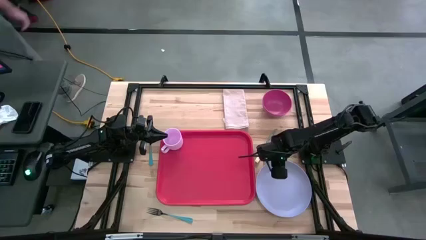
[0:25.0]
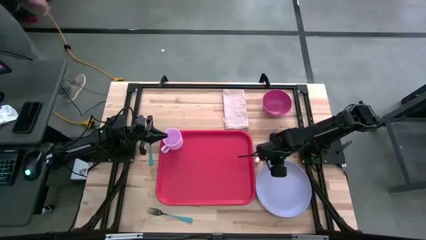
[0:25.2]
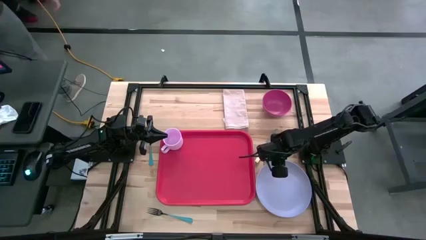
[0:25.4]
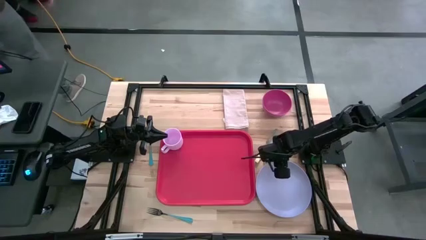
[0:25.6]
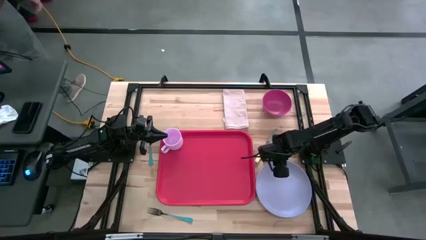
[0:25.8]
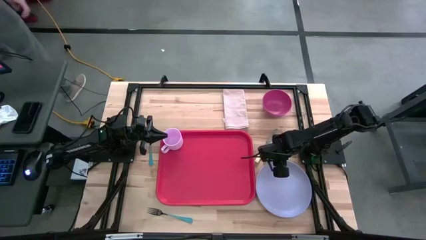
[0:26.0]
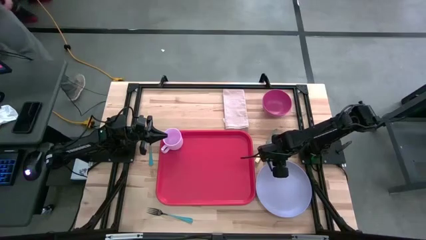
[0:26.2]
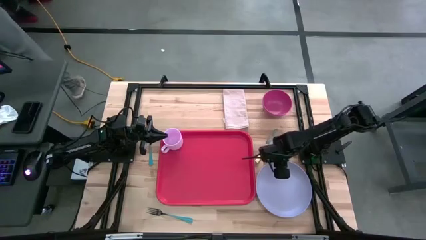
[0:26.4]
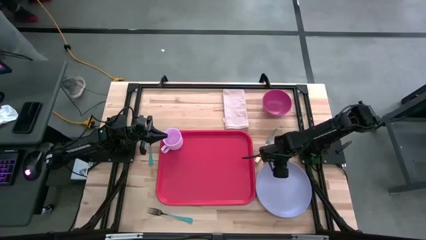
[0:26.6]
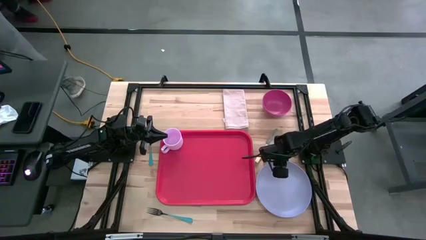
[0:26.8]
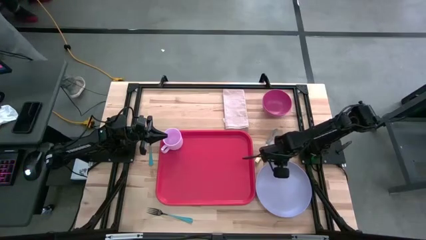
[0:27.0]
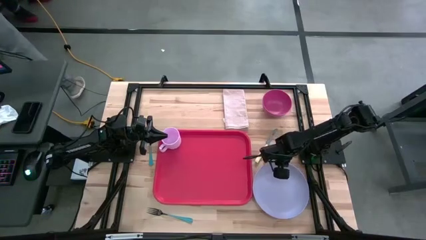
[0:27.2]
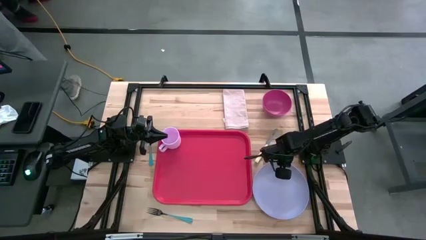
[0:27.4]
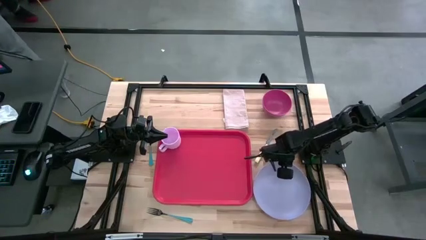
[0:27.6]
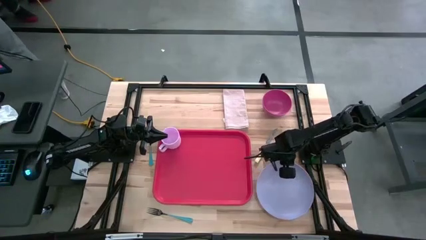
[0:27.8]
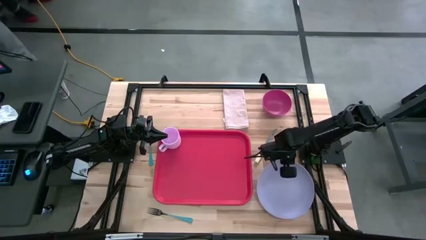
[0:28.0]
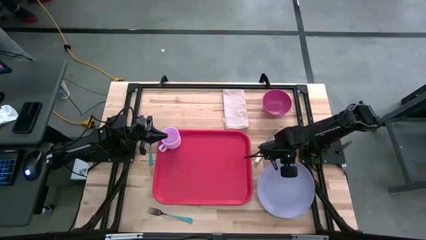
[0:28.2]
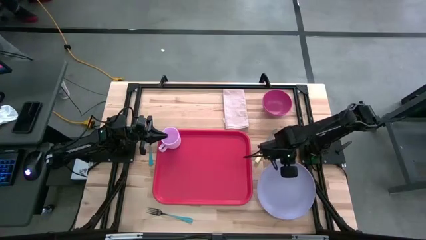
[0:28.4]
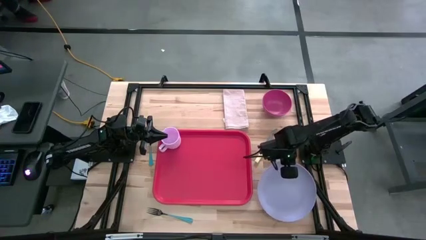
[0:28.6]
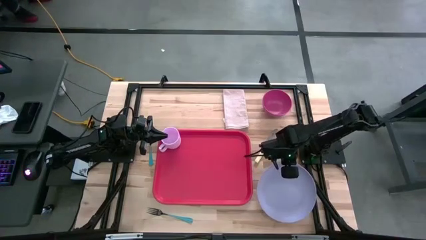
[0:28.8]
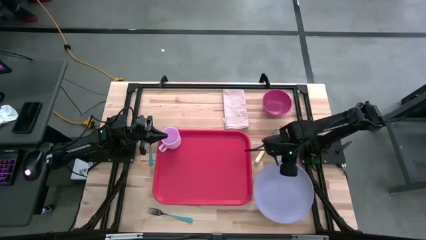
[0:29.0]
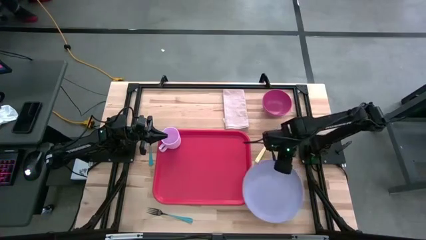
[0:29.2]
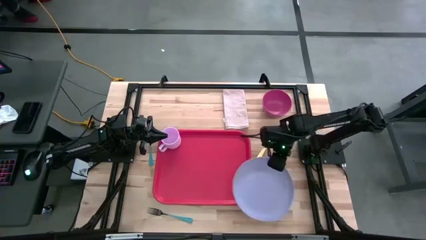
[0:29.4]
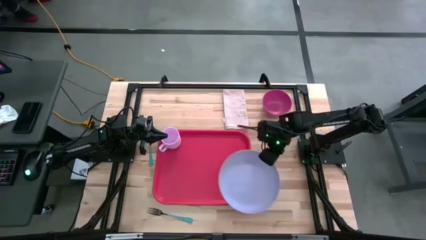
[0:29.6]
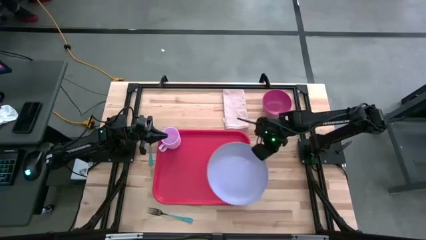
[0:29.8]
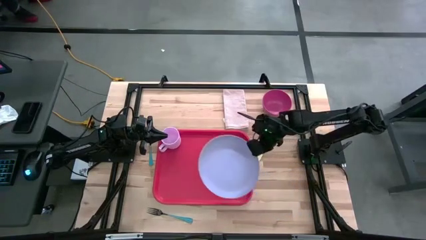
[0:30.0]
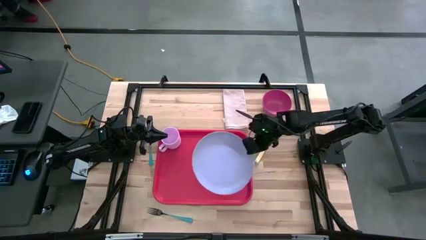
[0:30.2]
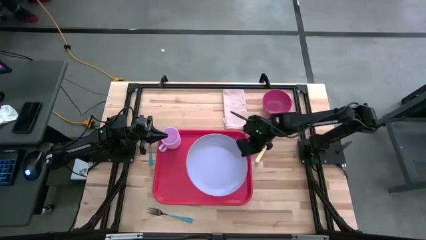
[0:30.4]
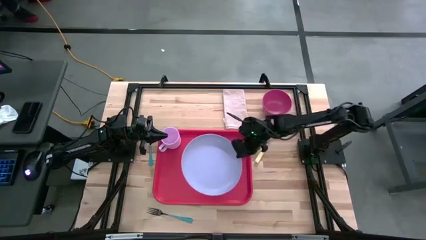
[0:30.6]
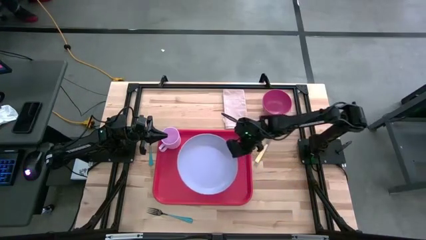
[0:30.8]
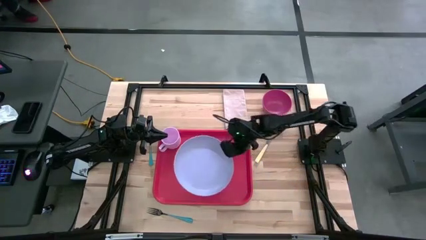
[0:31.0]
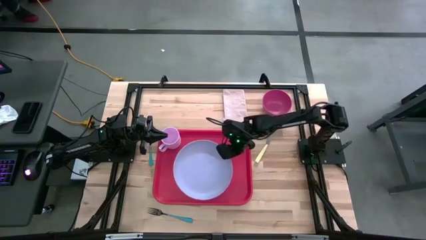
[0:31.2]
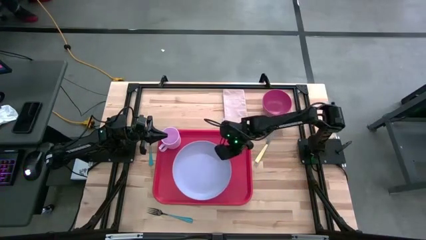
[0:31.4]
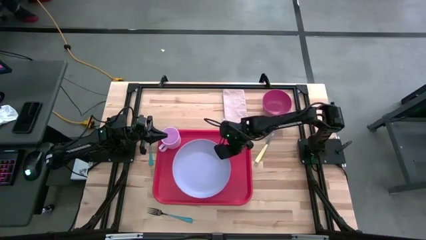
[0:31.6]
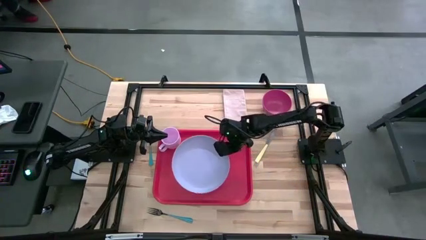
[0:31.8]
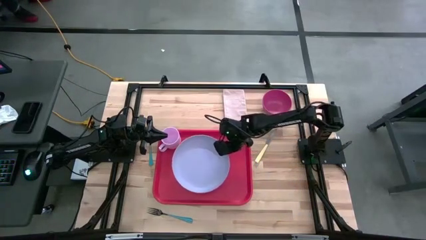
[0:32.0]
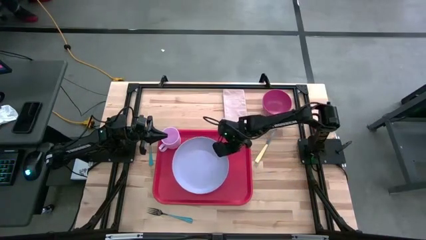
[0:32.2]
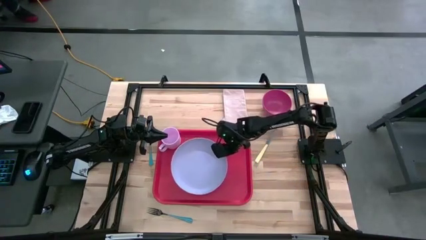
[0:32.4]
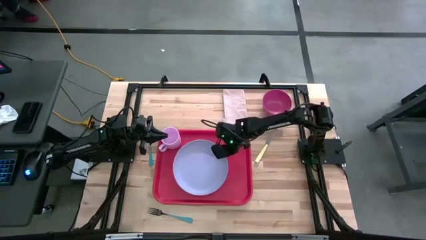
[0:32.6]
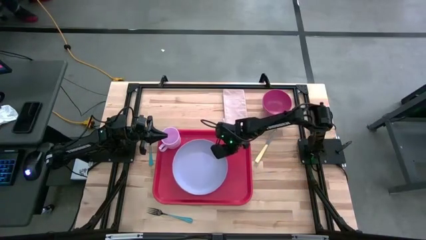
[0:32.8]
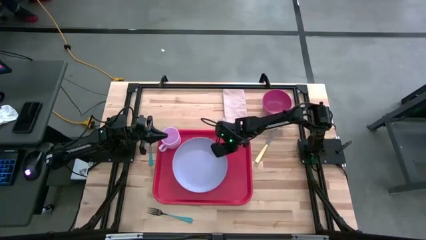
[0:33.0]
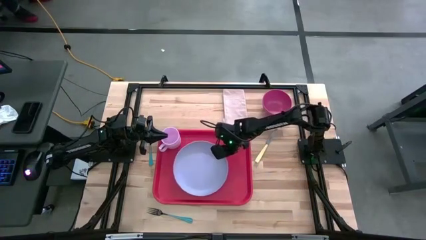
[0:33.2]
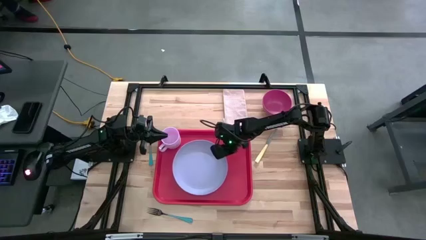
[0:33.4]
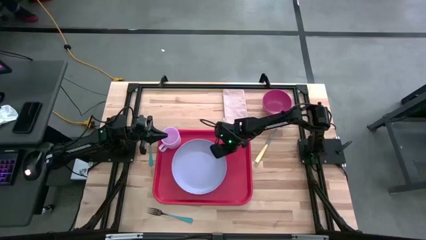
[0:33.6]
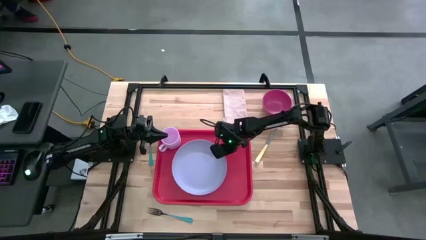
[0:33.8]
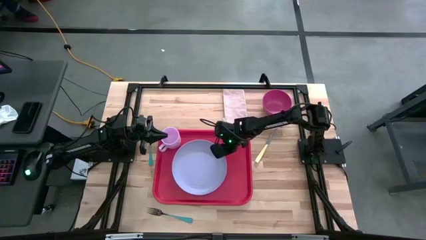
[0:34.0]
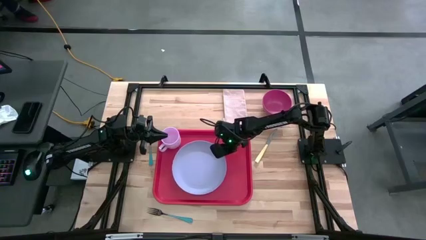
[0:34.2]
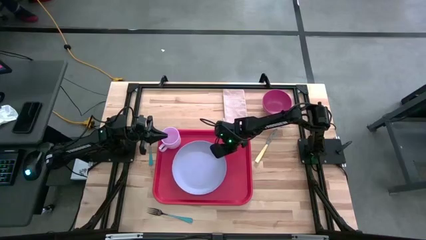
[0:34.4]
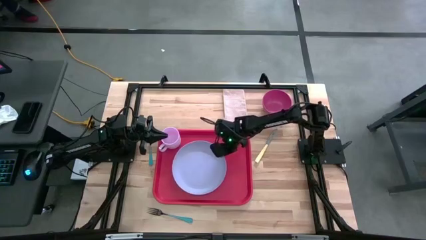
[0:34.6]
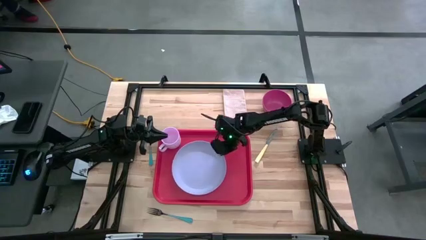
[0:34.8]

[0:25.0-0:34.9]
Task: Set up tray
Put the blue plate on the red serving tray to the bottom right of the purple mug

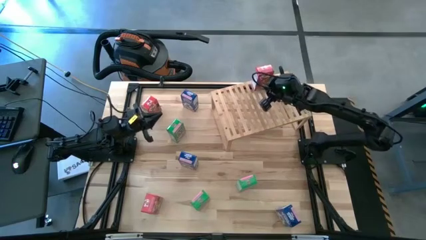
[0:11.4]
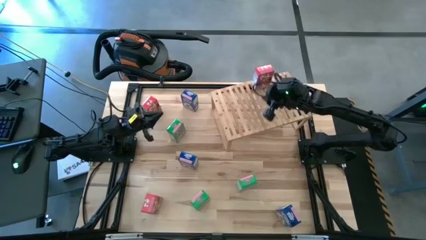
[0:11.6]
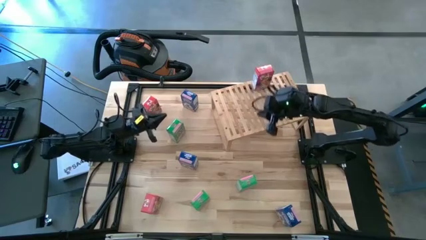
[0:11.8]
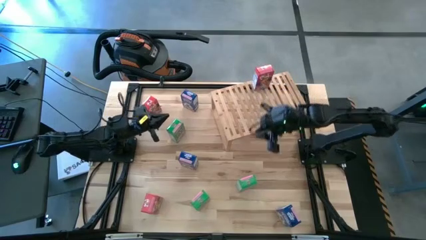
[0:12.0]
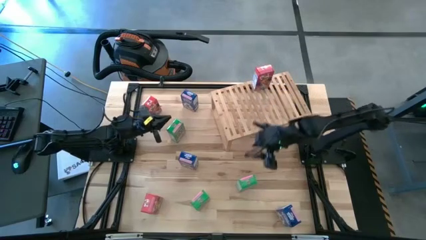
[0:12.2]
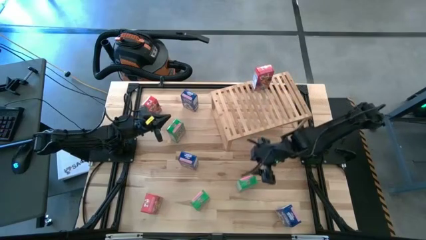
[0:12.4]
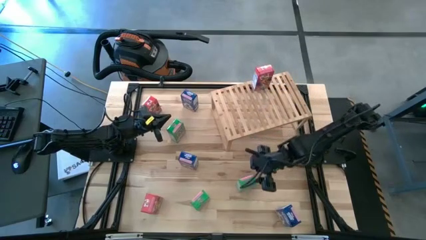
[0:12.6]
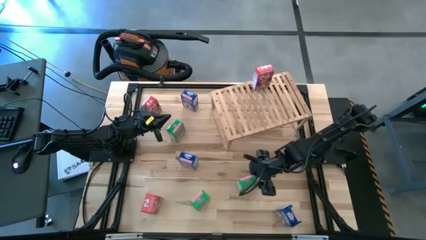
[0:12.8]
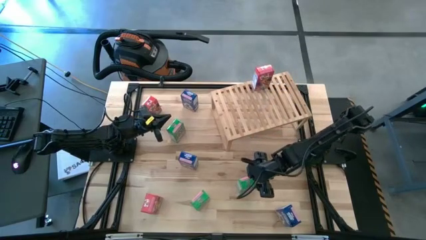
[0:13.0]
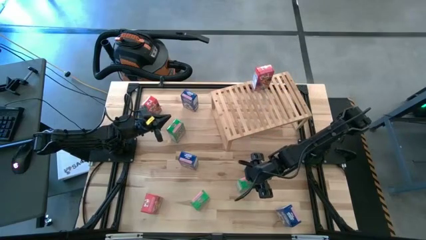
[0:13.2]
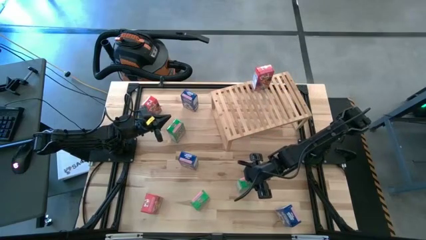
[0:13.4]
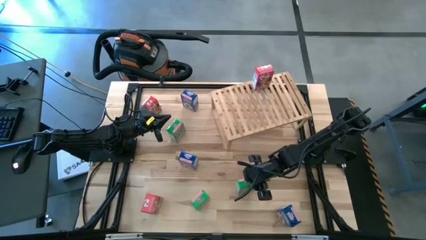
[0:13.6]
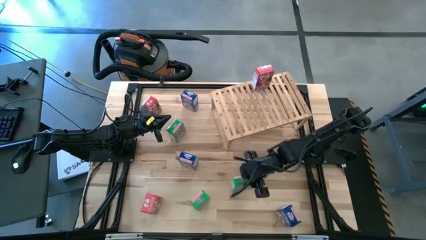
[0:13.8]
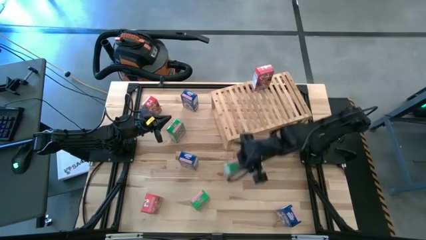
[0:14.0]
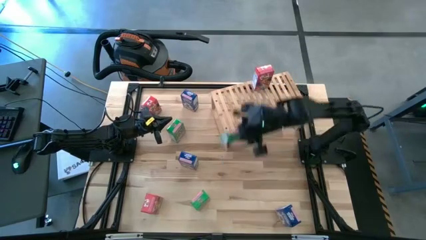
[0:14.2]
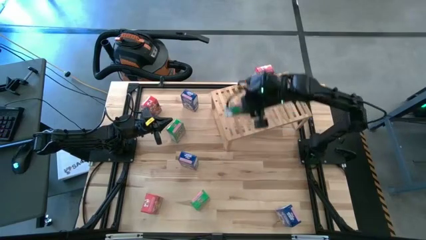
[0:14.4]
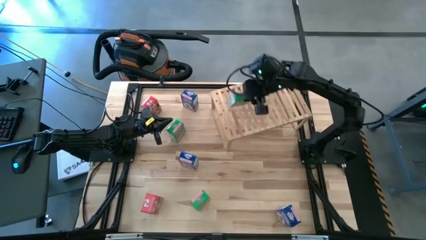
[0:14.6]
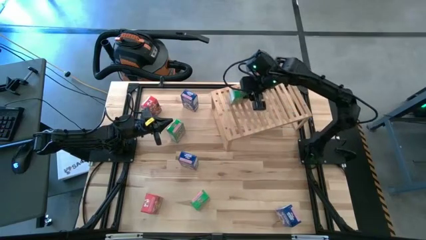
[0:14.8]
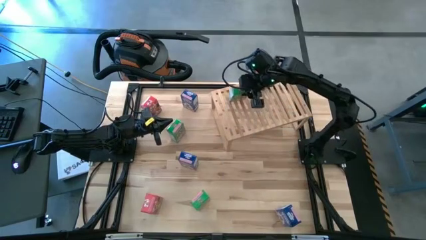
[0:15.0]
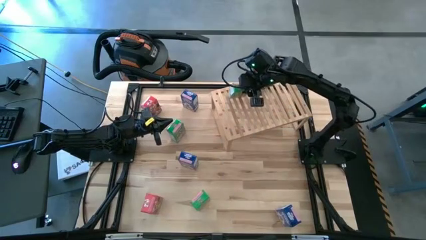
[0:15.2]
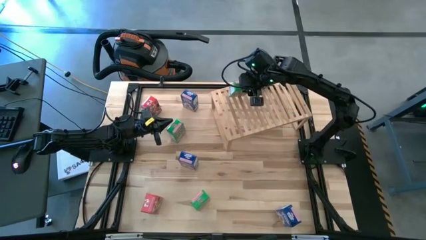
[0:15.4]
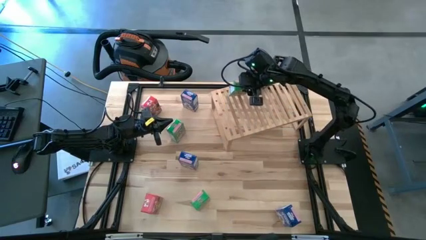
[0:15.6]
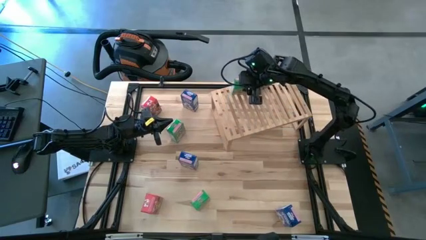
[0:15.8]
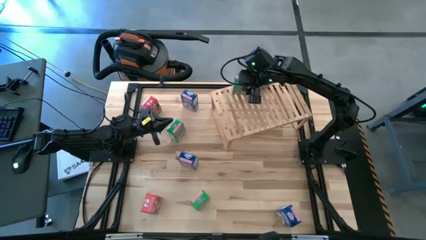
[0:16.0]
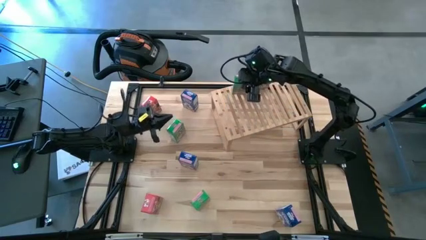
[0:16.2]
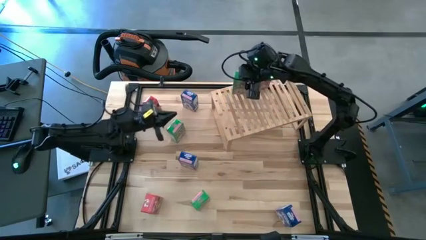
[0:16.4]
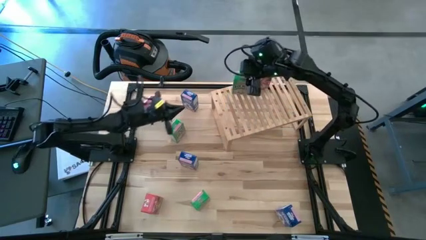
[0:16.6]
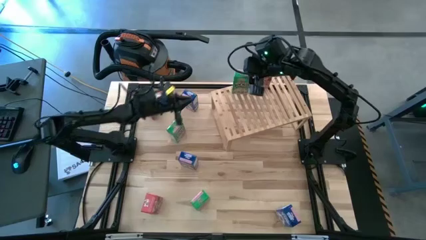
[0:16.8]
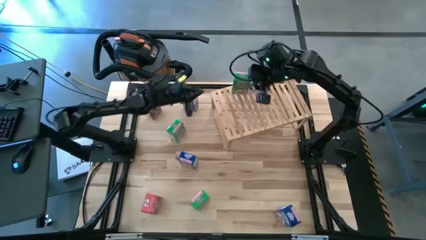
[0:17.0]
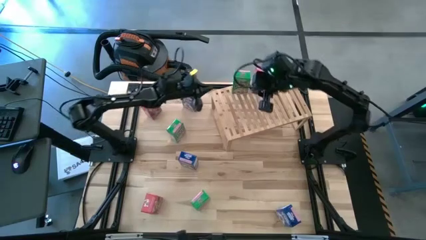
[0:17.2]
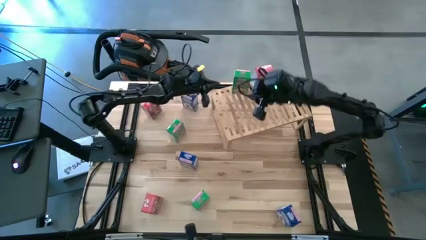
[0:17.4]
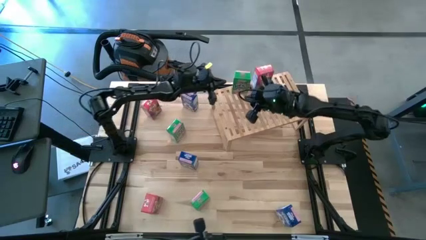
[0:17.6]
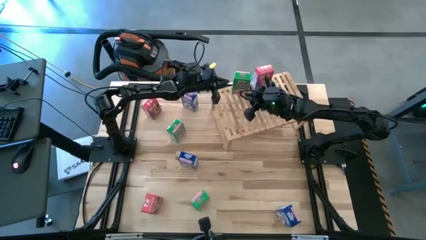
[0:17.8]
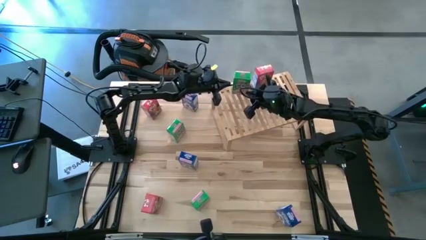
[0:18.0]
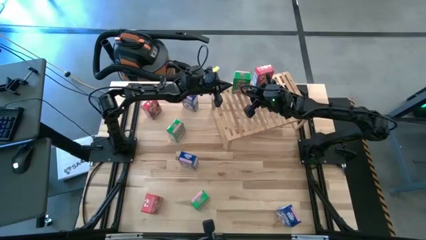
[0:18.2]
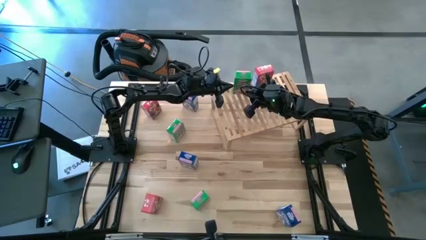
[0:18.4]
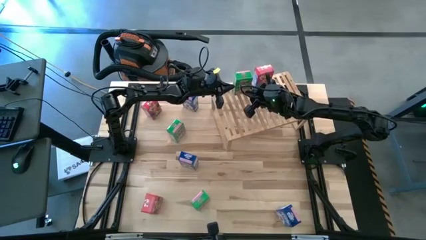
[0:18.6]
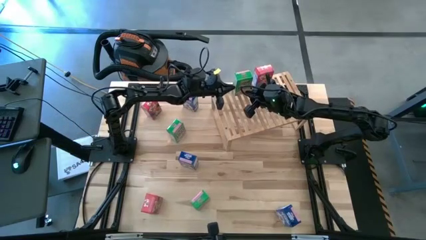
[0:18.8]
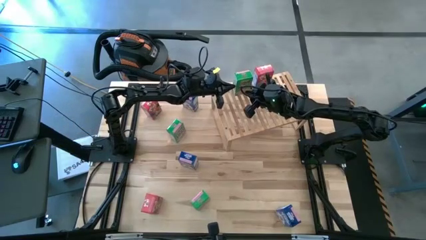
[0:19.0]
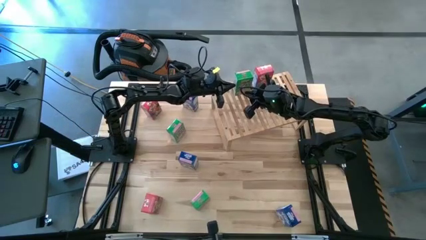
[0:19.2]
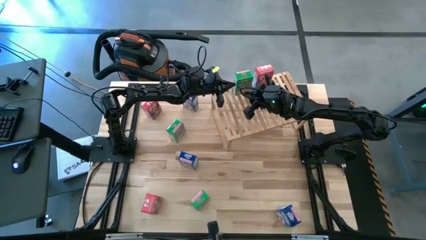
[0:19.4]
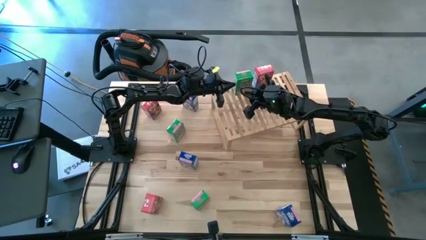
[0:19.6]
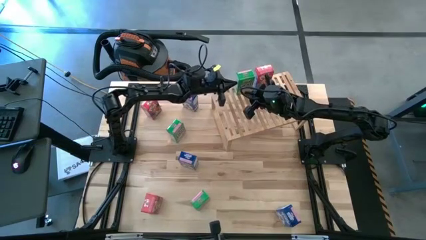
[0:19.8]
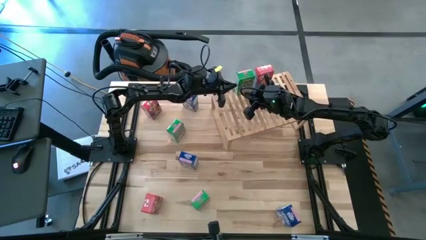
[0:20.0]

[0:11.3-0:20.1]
Task: Stack cereal on shelf
Put the bottom right green cereal box on the shelf
